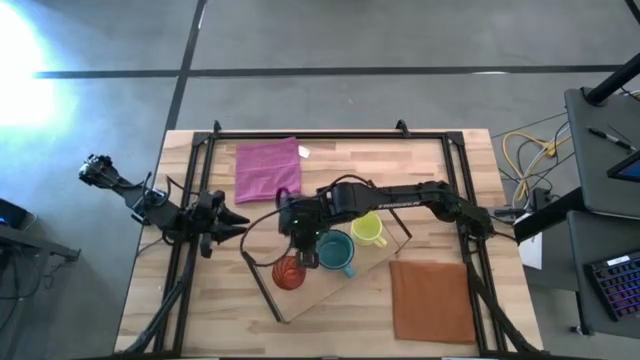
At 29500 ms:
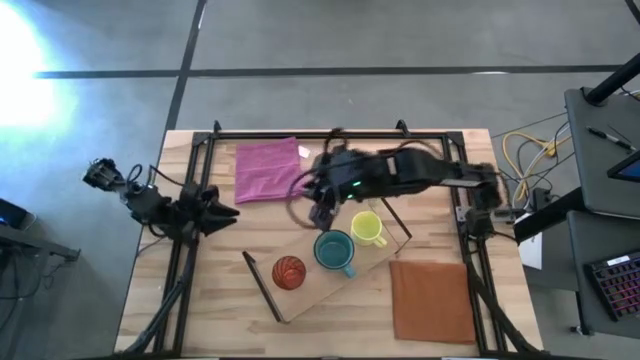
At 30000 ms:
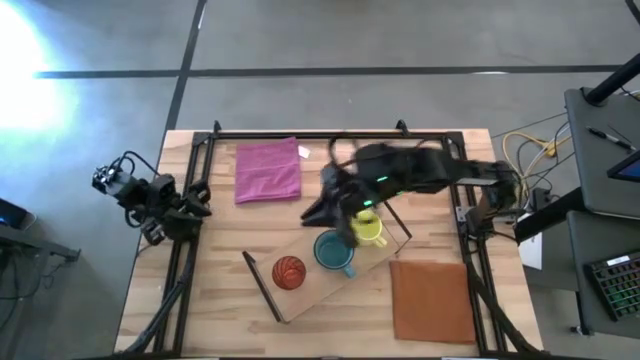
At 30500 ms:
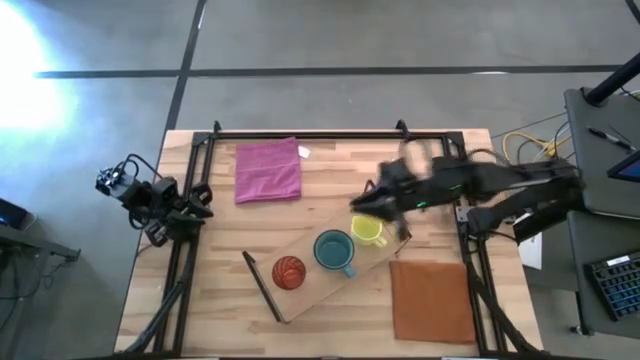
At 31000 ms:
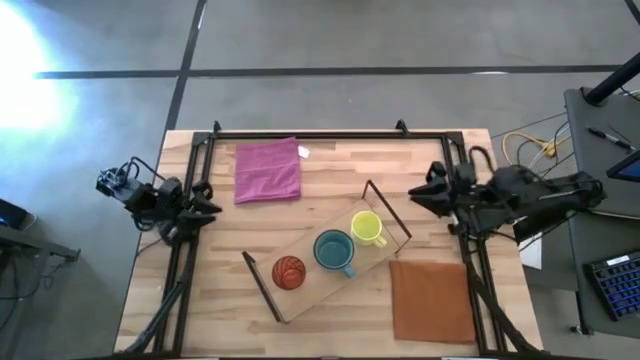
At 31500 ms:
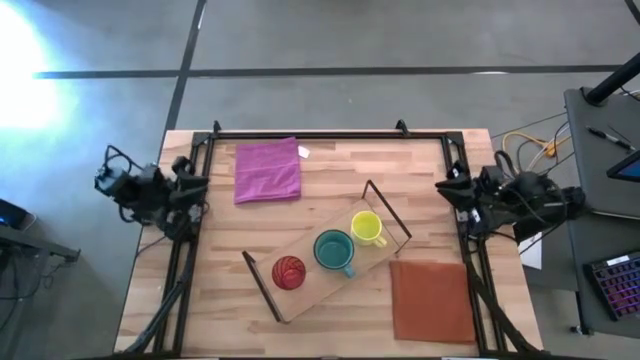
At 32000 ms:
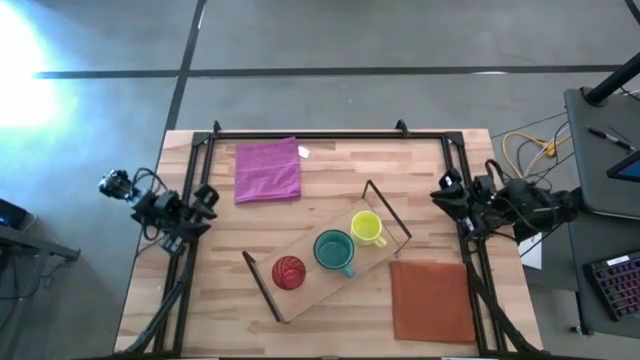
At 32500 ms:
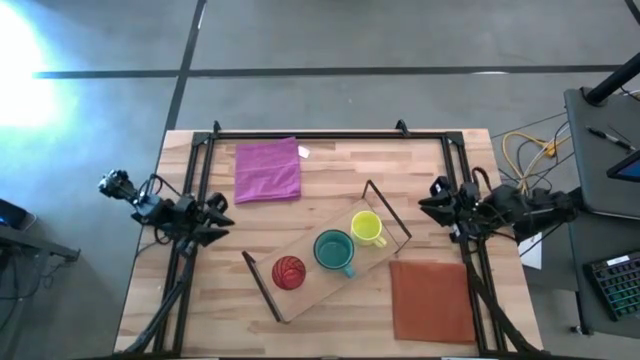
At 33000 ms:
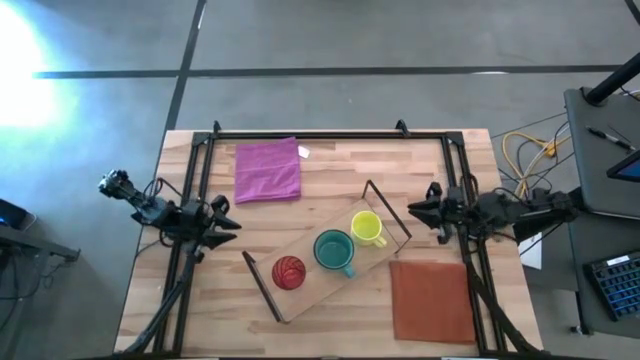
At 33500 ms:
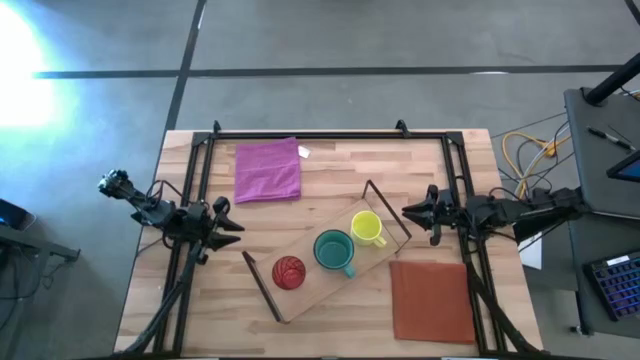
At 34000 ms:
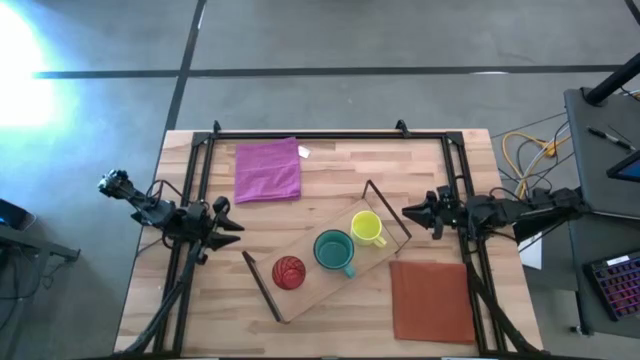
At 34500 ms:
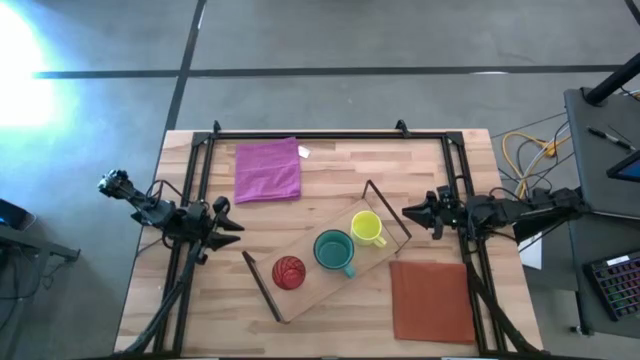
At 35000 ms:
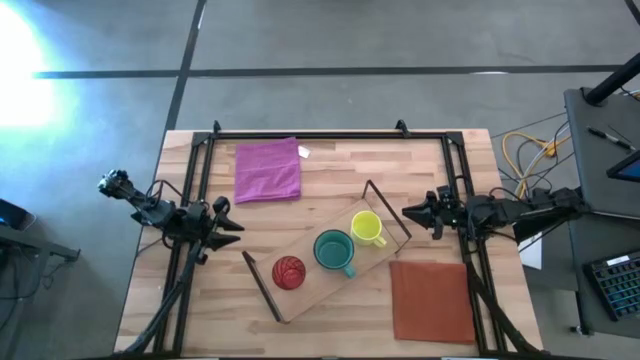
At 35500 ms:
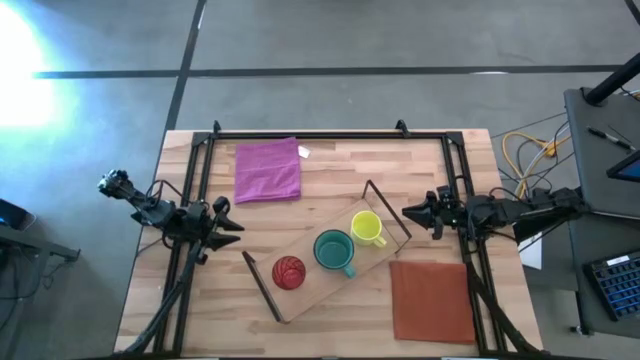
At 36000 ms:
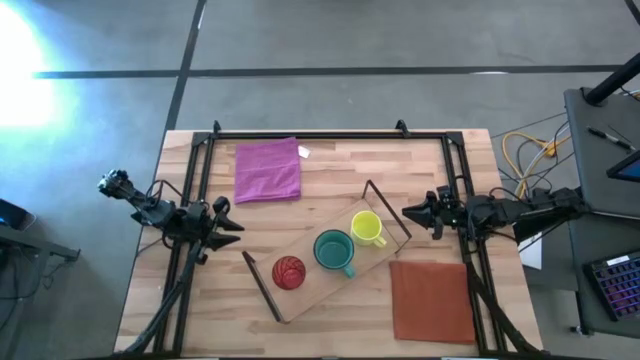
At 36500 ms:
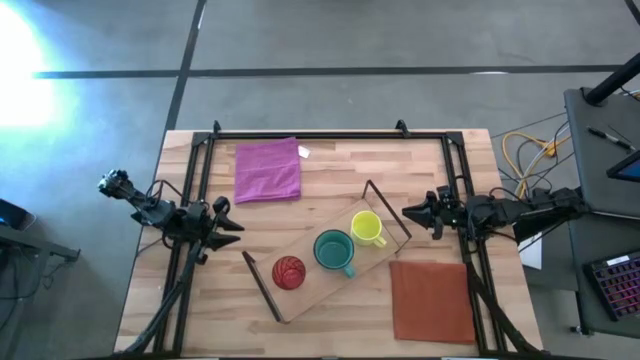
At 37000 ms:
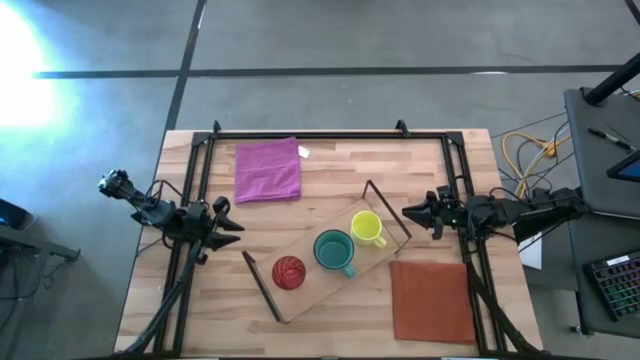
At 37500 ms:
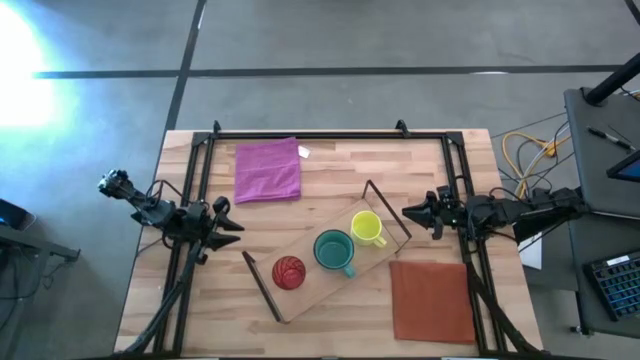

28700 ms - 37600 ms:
Task: Stack small to large cups/mugs on shelf
Return to Home Position

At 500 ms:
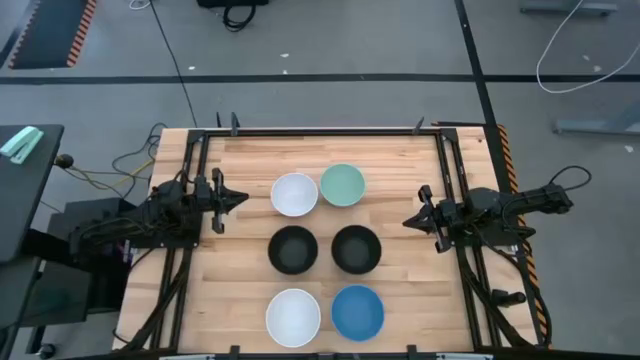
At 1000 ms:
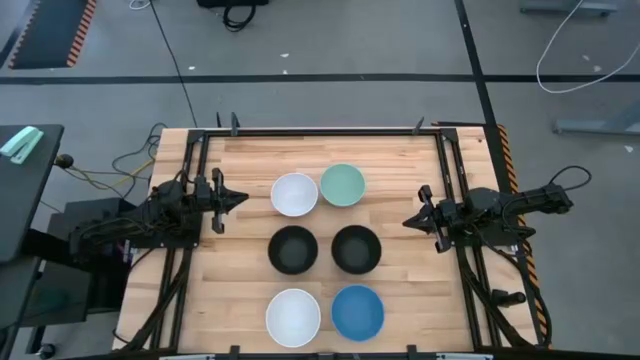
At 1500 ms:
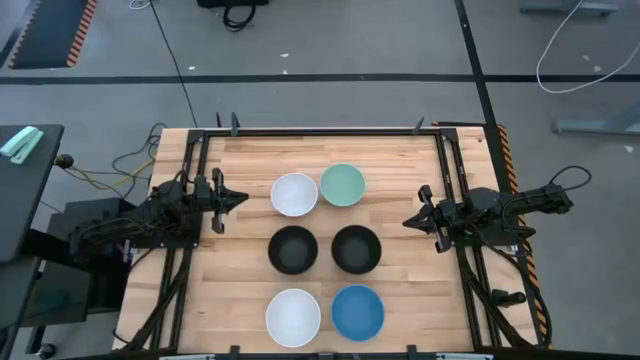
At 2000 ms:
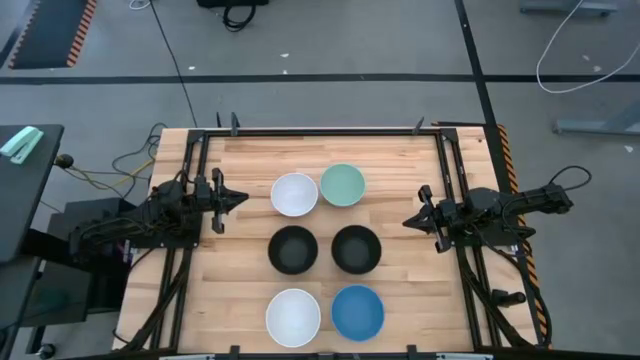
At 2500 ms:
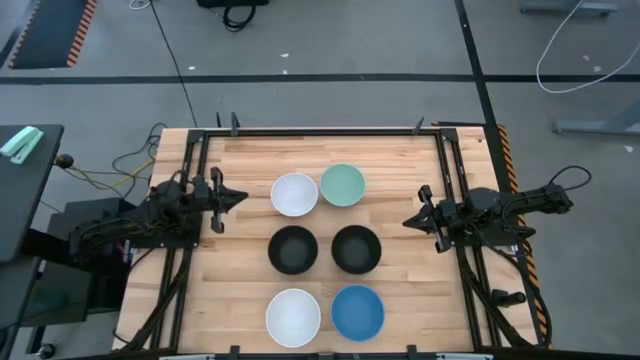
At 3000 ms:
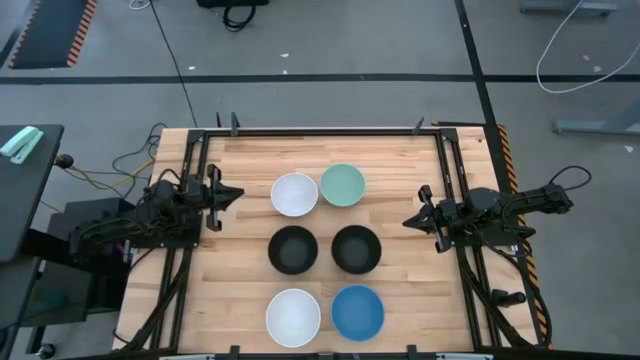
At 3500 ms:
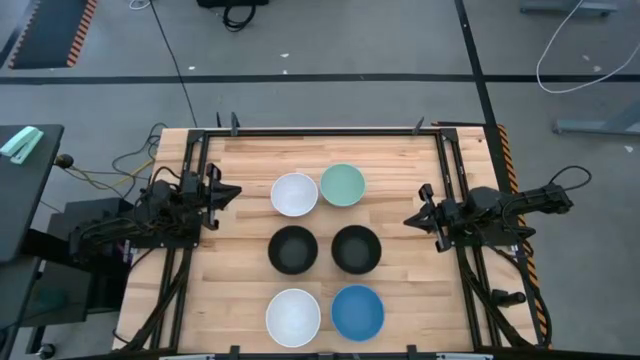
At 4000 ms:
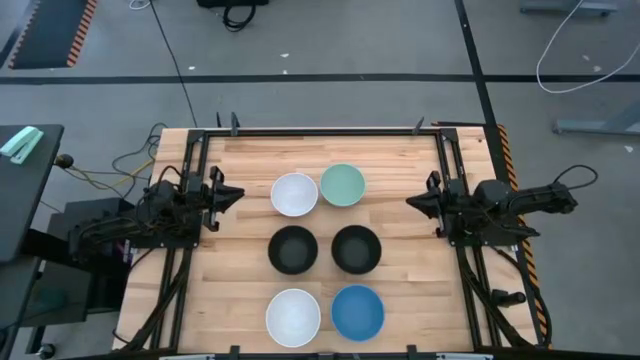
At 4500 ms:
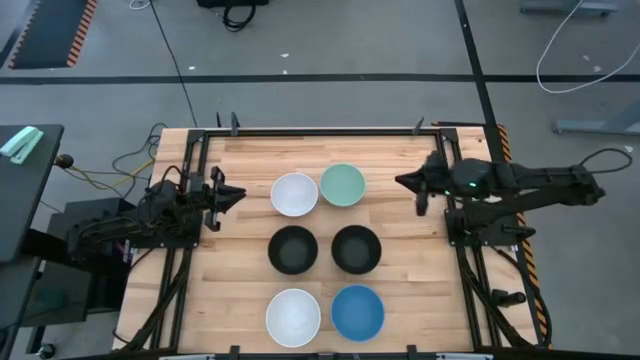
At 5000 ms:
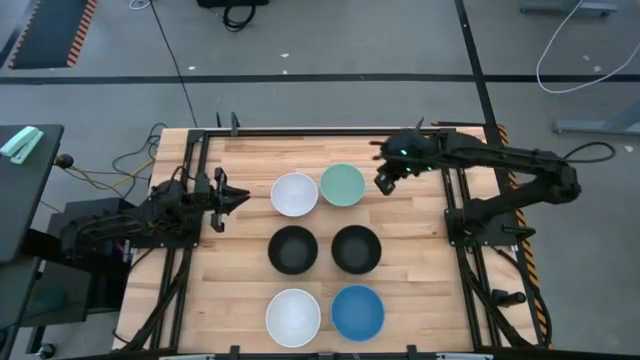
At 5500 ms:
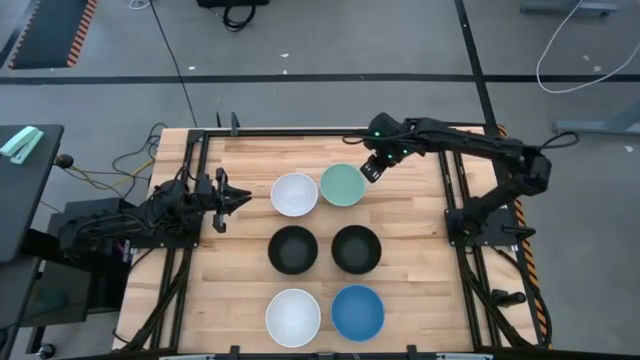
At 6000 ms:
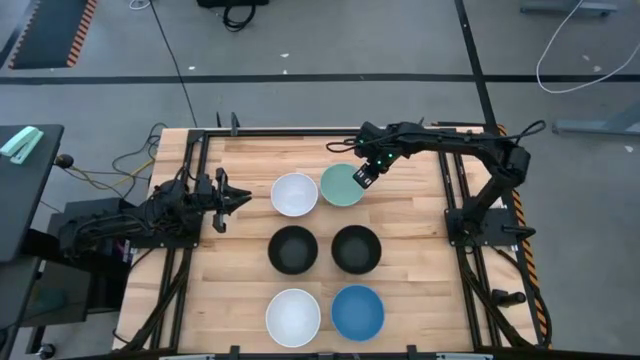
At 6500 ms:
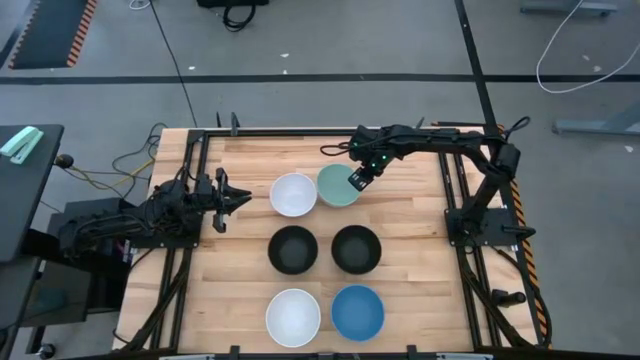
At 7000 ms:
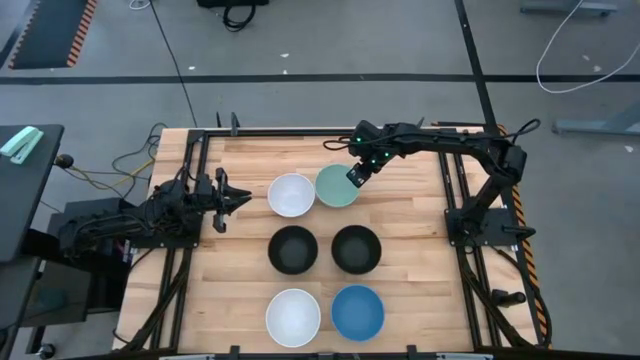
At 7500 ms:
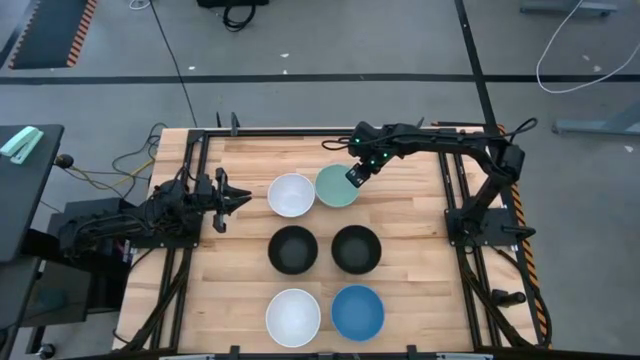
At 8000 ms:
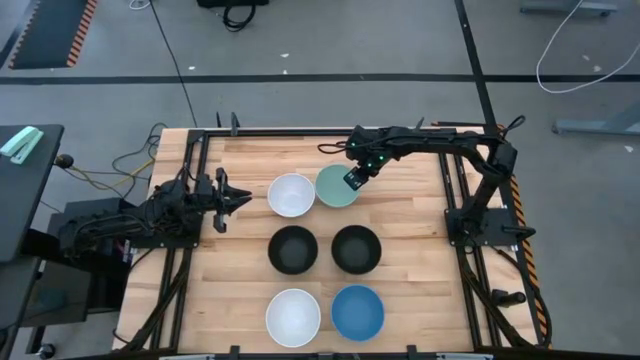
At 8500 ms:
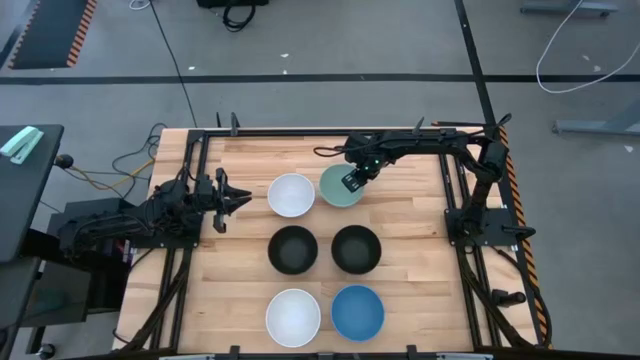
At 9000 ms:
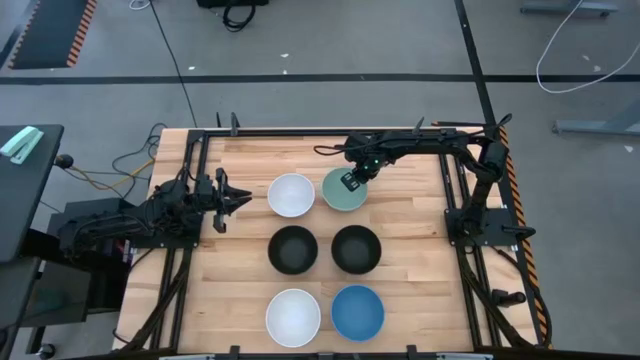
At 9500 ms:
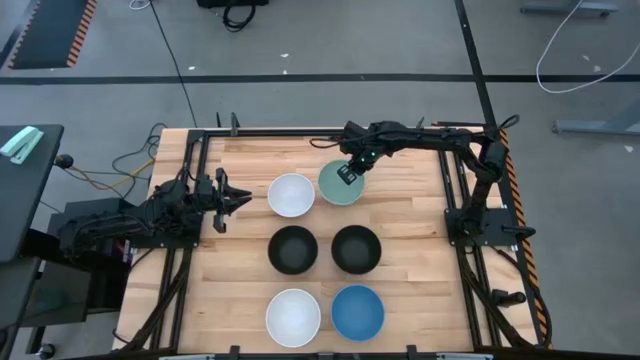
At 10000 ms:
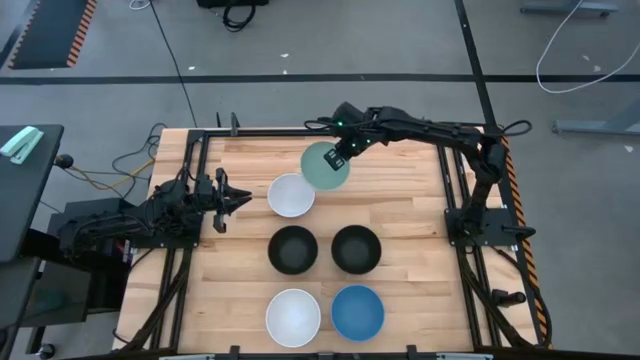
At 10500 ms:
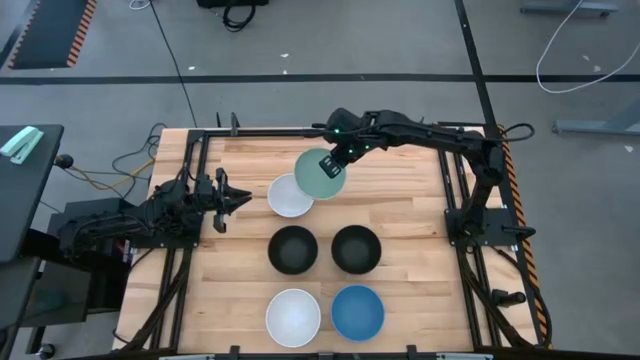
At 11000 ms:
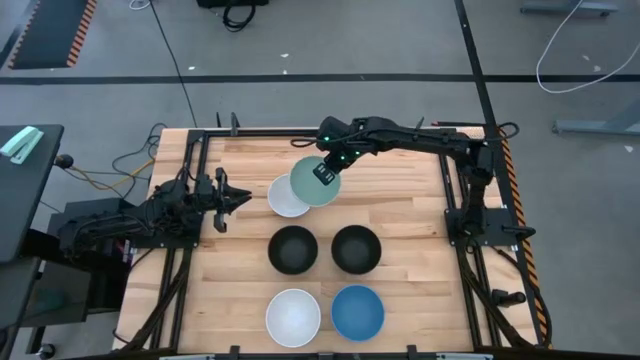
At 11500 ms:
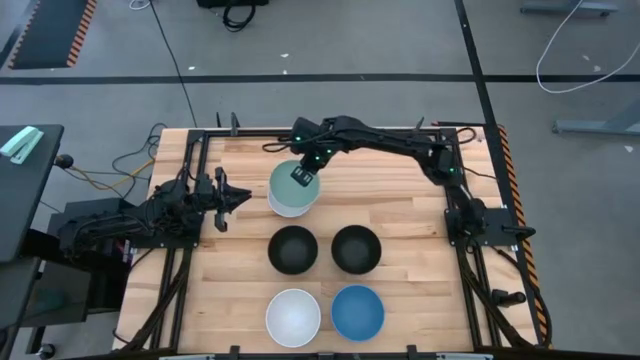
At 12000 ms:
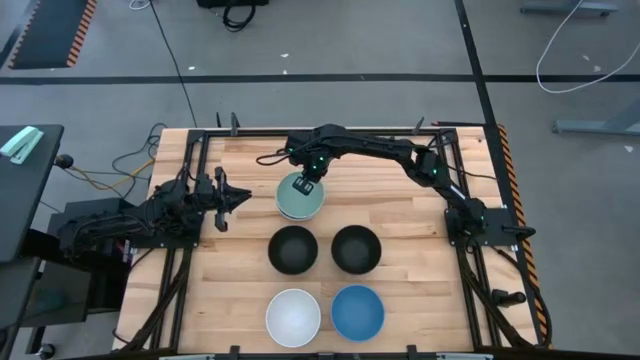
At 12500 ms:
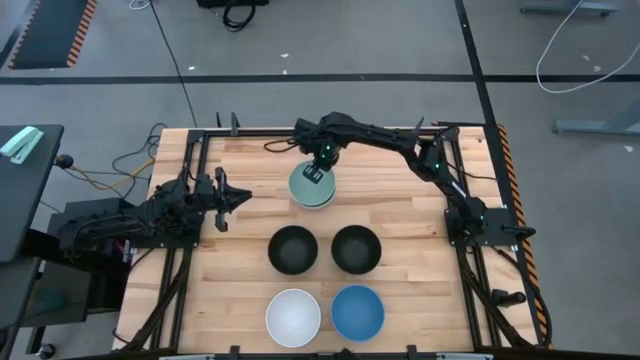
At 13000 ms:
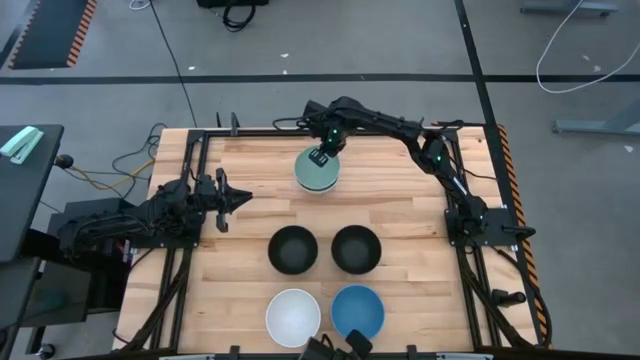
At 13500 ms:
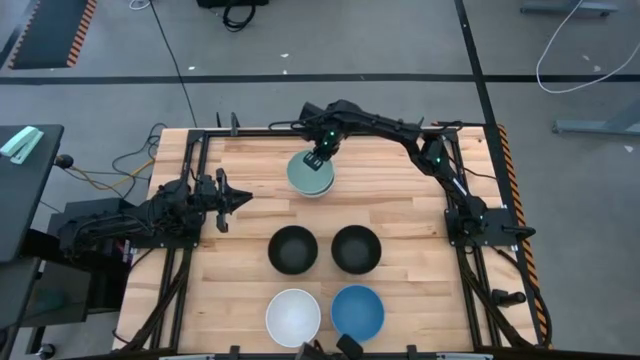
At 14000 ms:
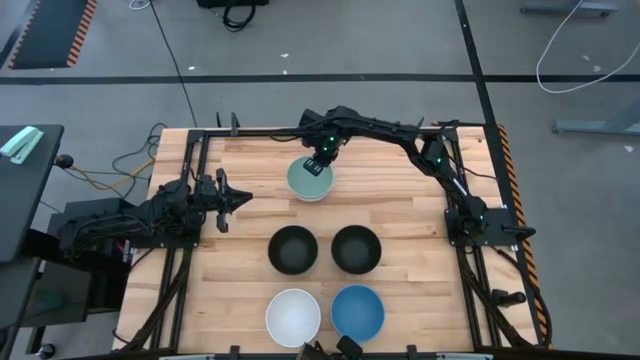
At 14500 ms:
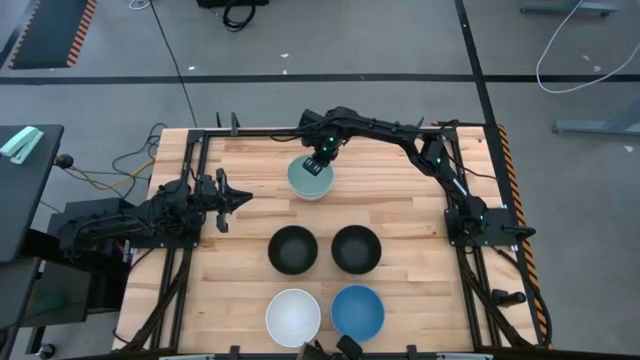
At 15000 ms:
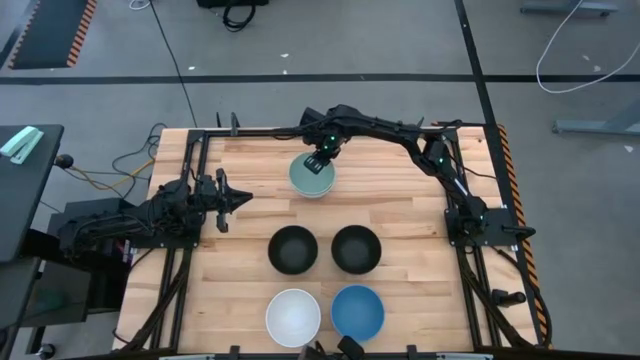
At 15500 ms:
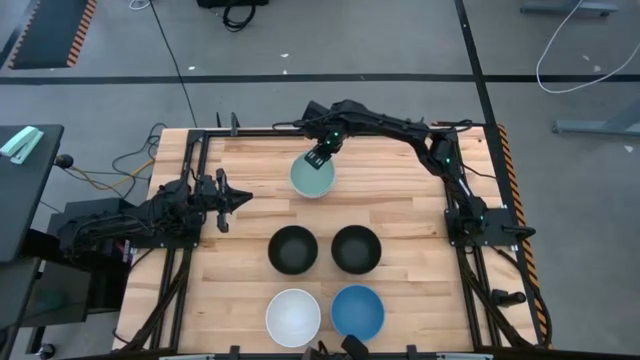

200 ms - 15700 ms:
Task: Nest bowls inside each other
Stack the light green bowl on top of the top white bowl
